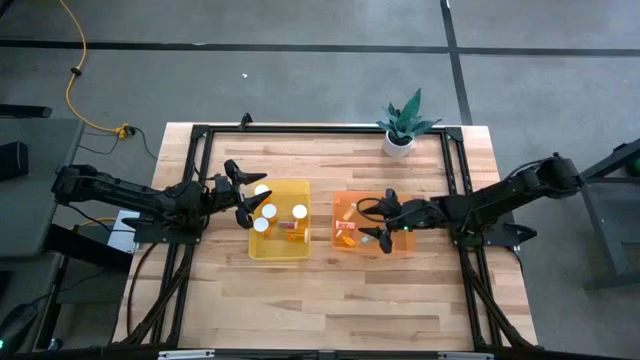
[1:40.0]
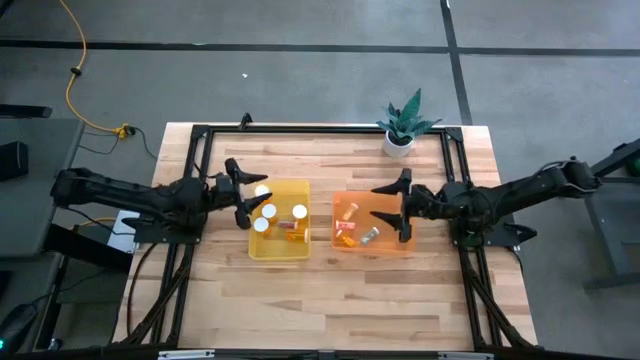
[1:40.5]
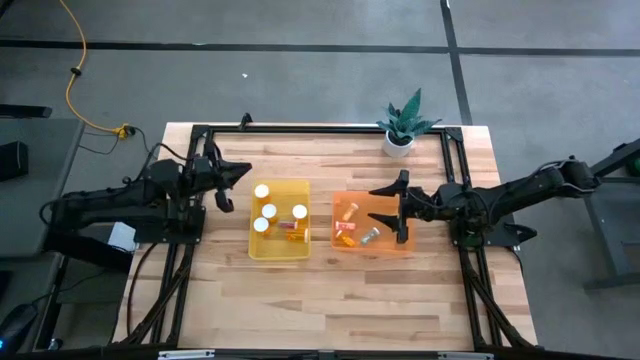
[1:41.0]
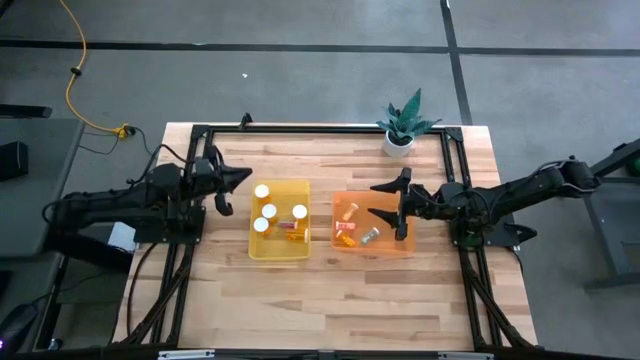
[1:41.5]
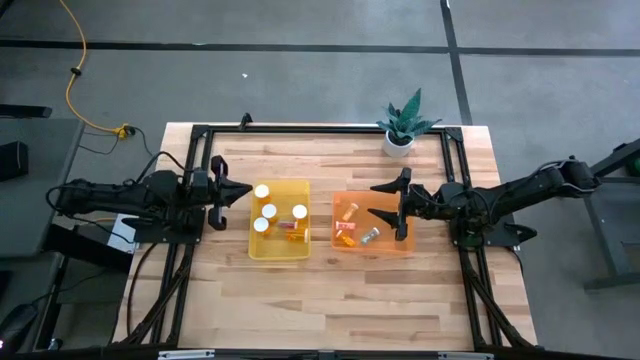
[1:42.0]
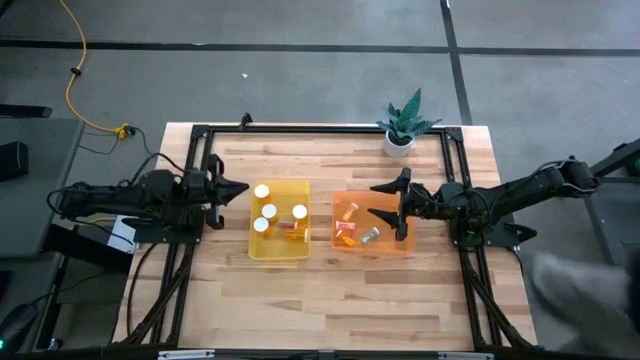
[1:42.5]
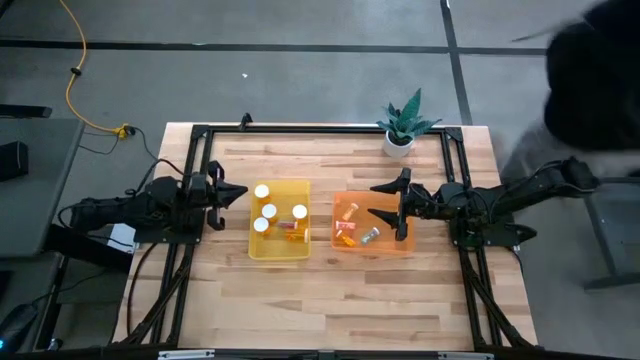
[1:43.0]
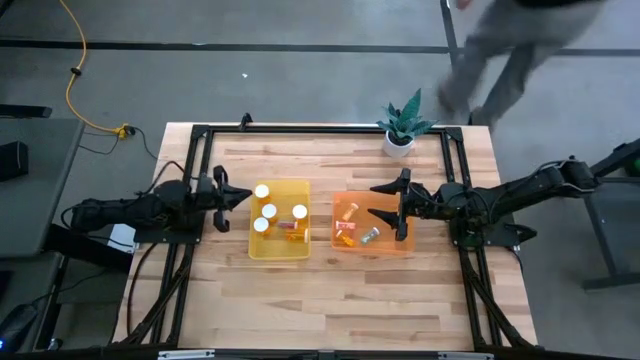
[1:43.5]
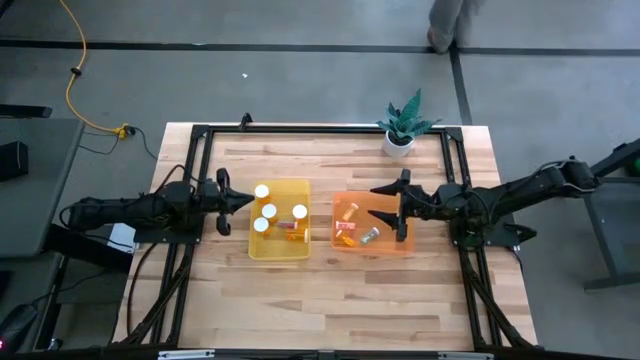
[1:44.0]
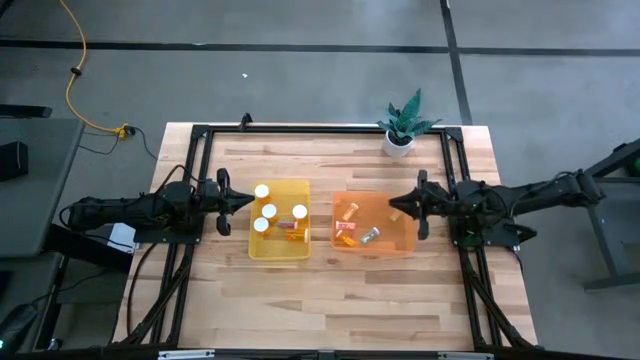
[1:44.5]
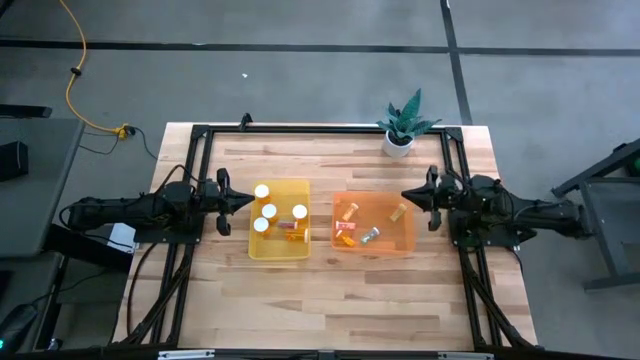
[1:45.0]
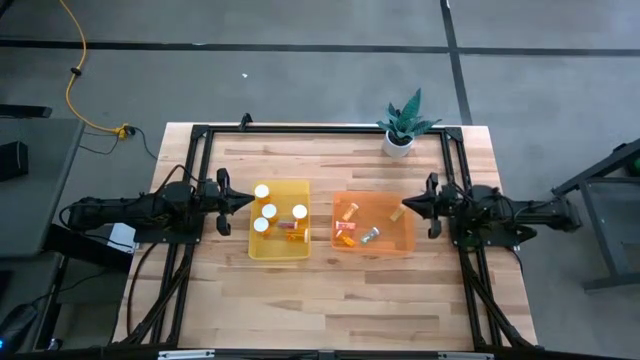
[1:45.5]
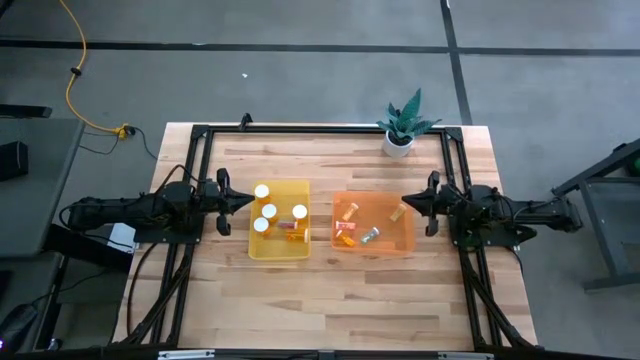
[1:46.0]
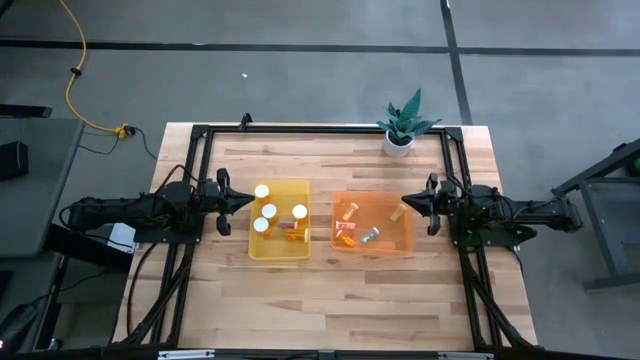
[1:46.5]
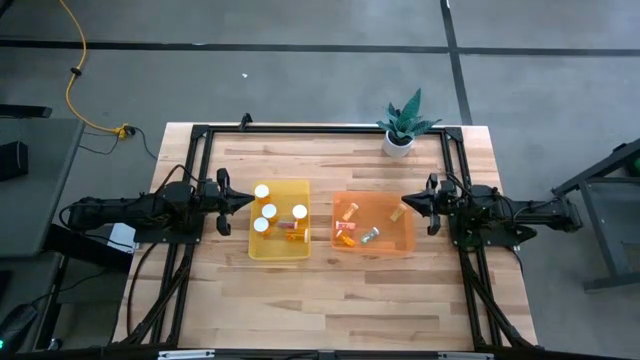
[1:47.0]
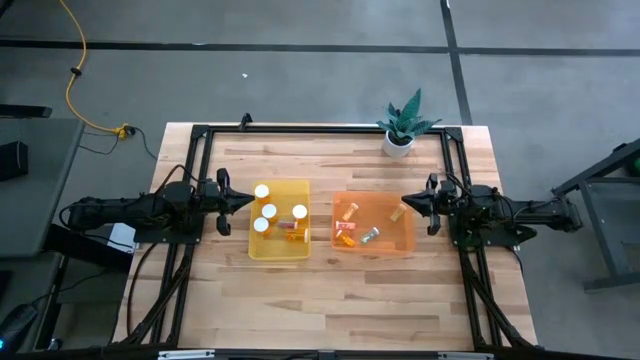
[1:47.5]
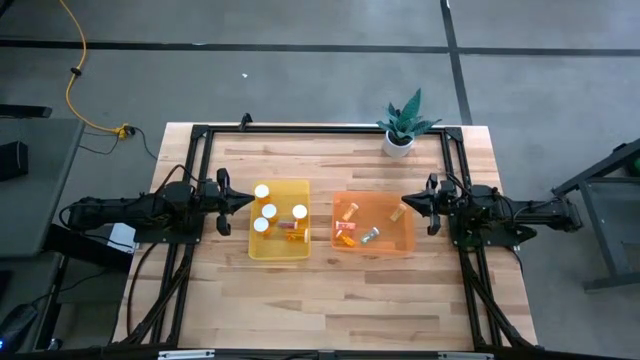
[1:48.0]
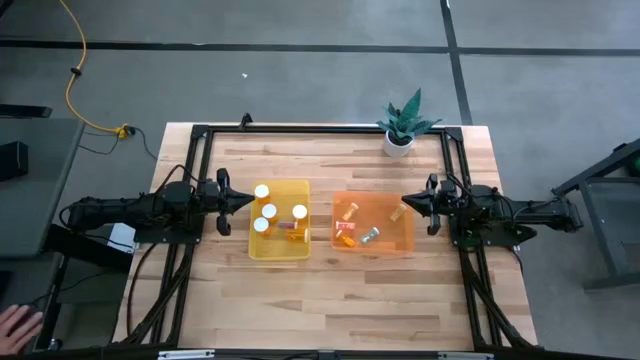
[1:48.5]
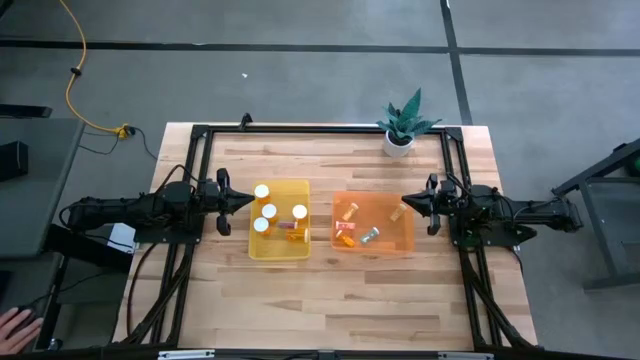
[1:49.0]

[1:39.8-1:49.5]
Task: Pick and place medicine bottles into bin by pill shape (circle, oval)
Return to Home Position

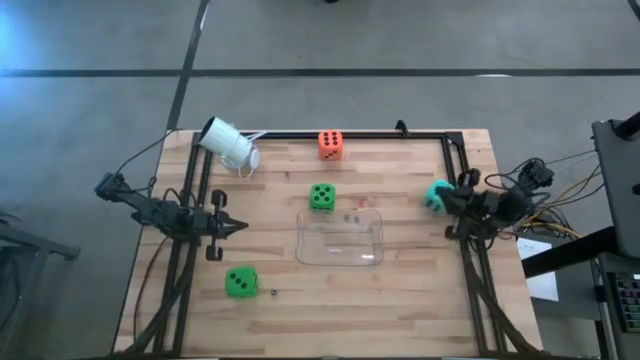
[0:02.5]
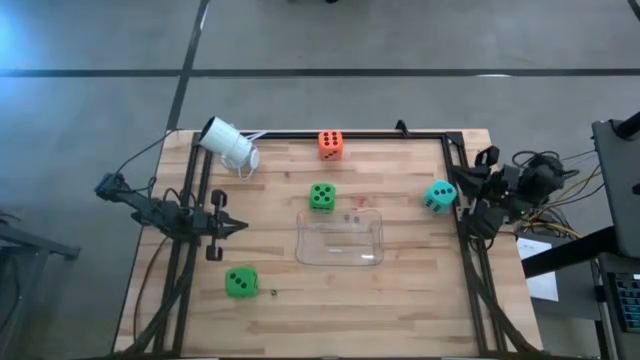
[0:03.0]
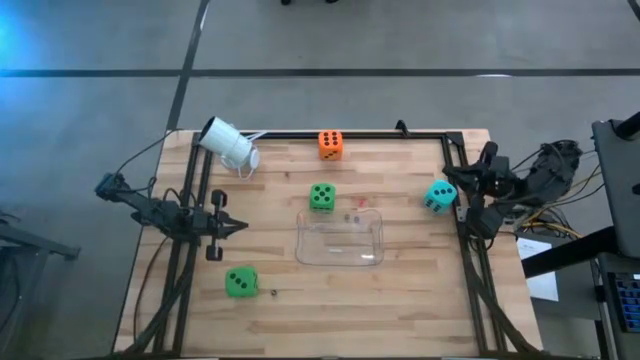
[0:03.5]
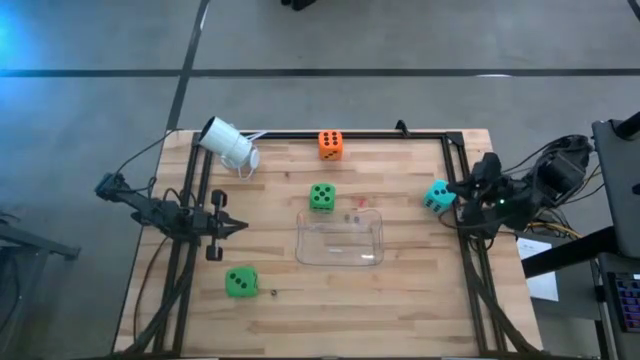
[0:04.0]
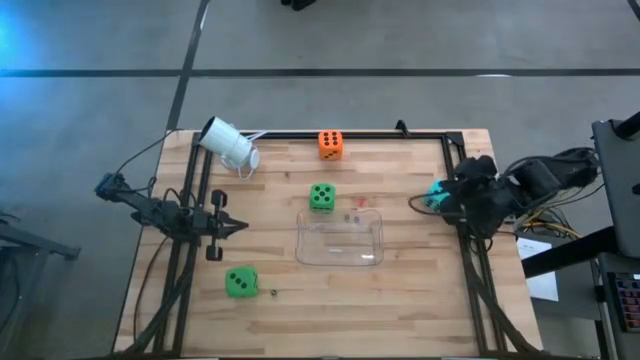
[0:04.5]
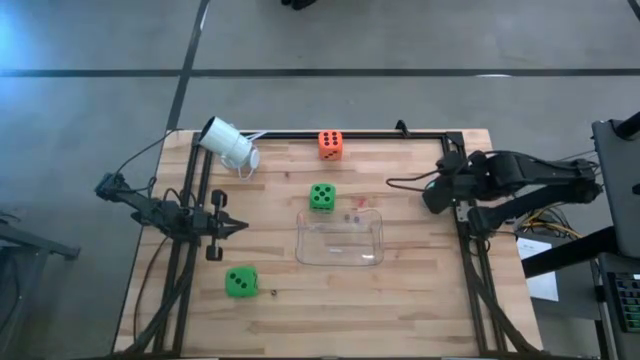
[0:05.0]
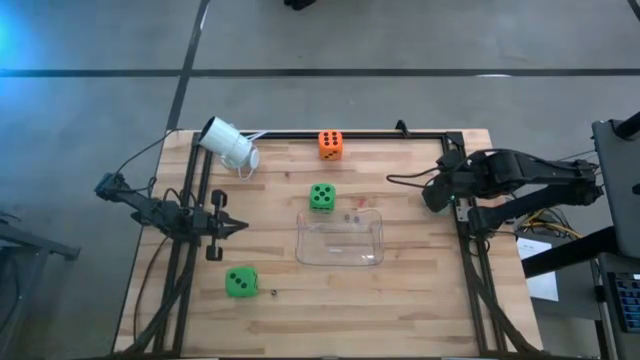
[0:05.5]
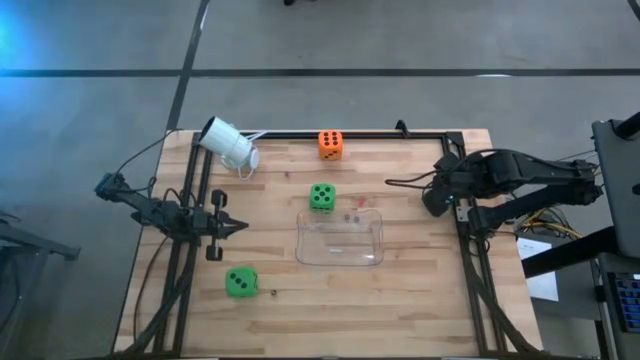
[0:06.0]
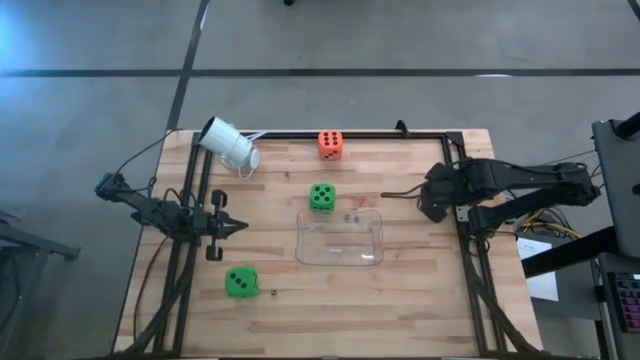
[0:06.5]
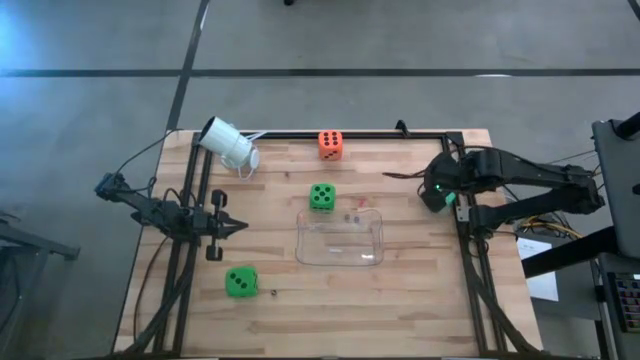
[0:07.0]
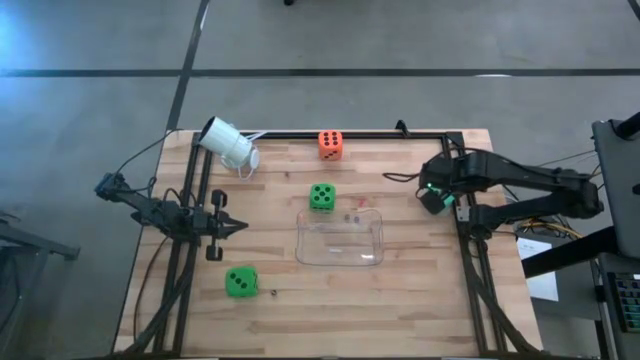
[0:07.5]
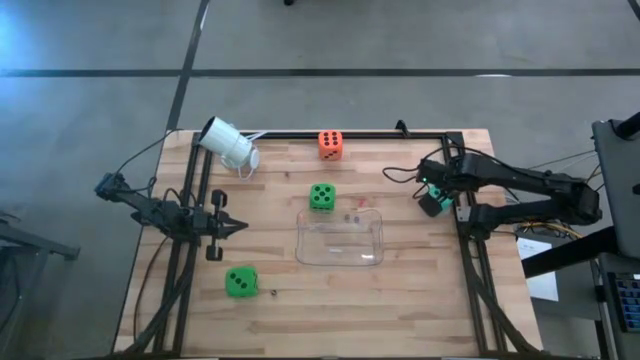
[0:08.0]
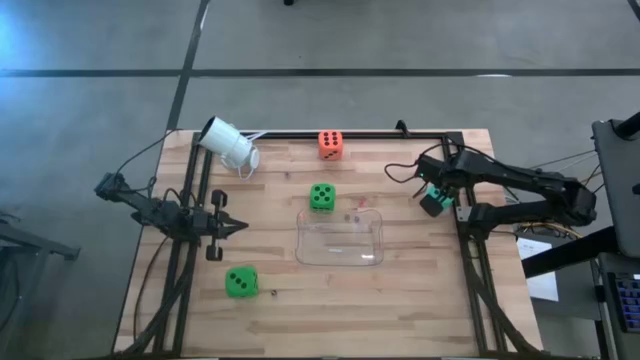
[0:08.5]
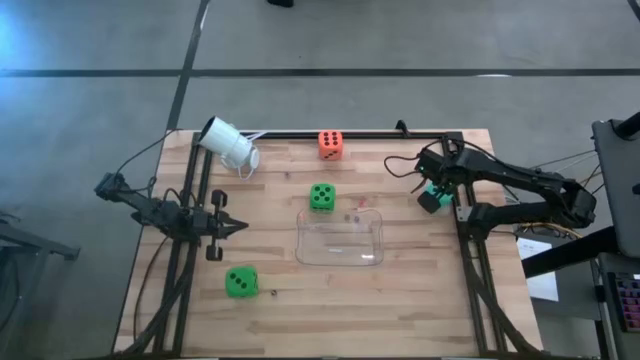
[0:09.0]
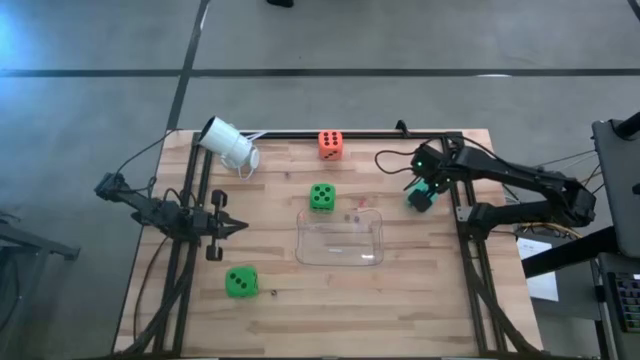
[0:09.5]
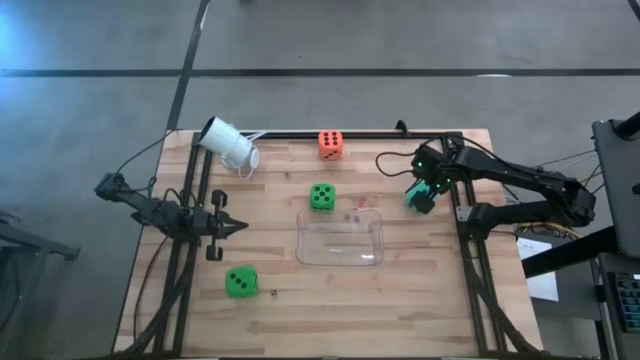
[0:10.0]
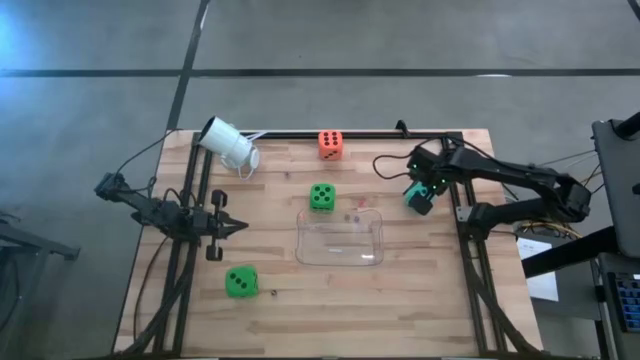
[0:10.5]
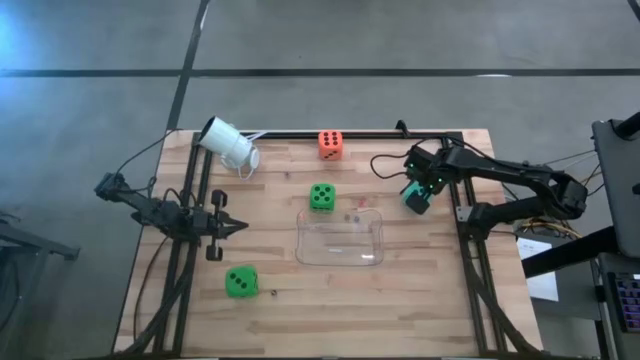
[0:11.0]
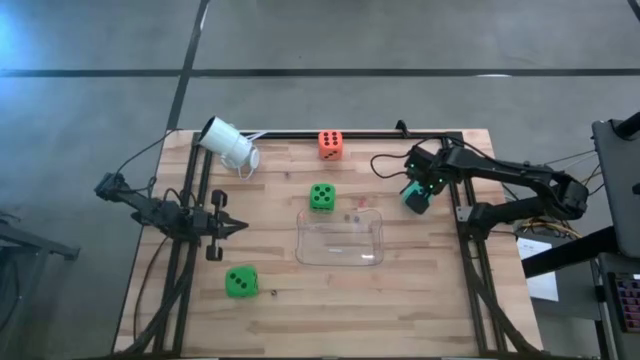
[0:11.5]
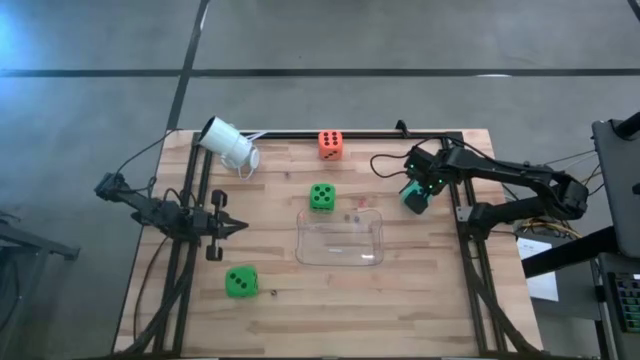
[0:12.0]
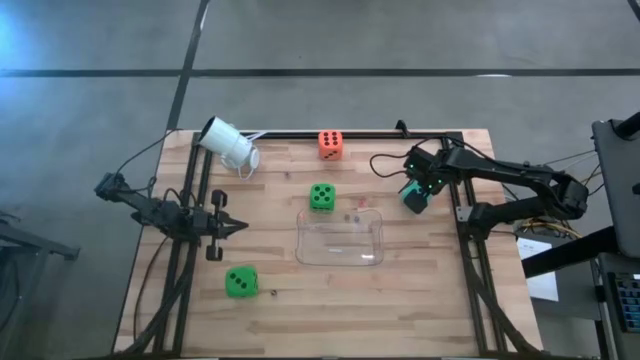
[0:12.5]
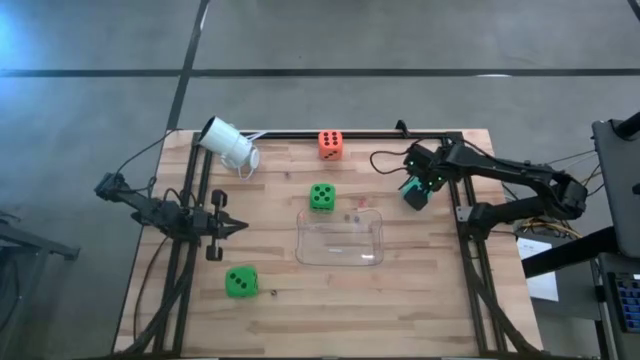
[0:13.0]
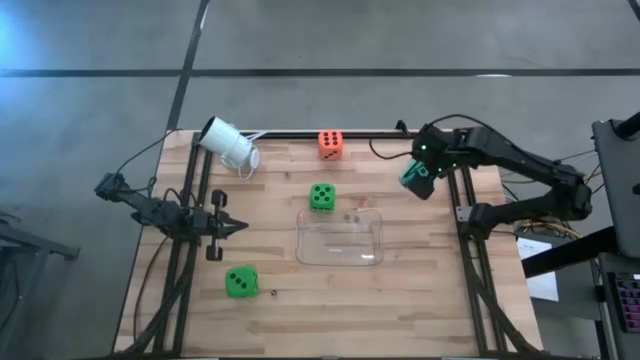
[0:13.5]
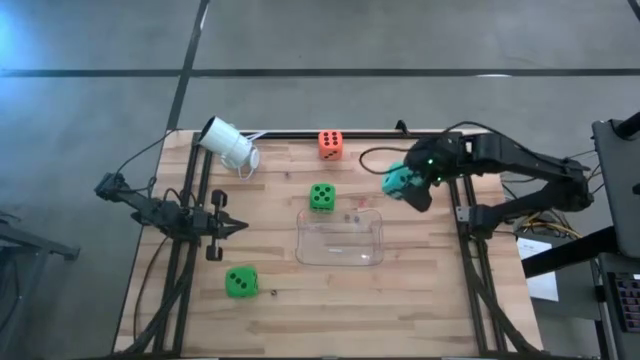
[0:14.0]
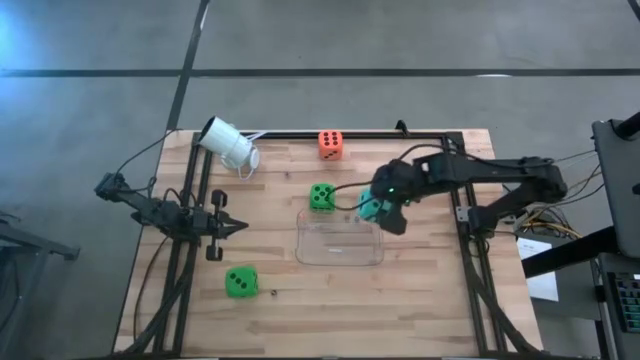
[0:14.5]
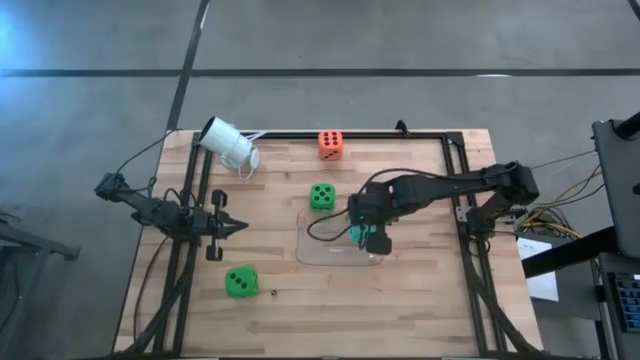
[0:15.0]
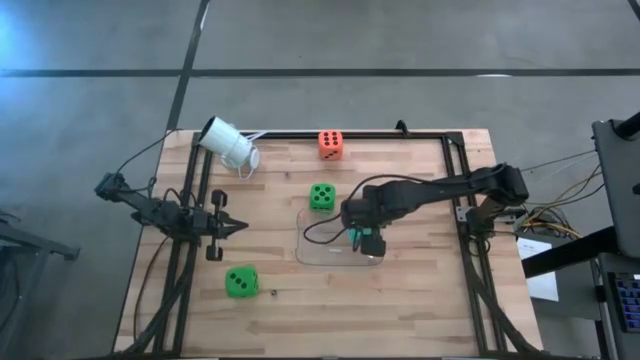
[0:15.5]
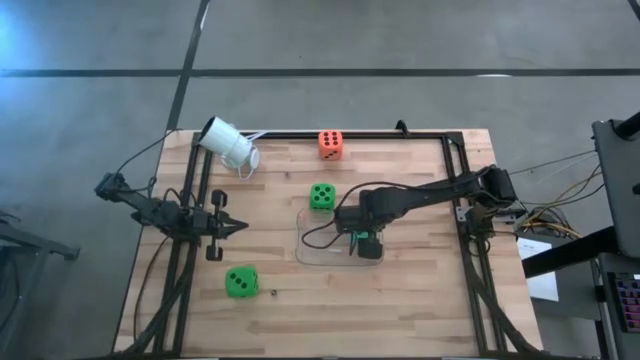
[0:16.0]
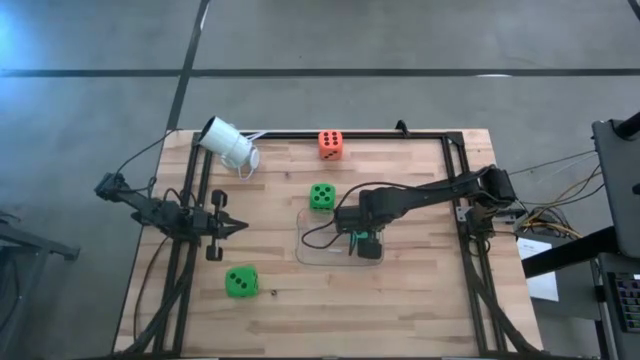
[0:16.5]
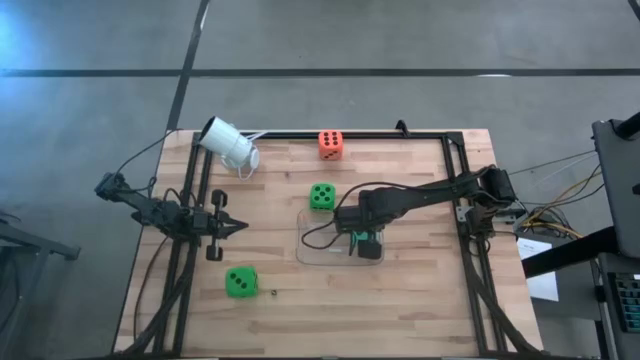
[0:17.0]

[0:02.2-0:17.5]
Task: Pick & Place Dice
Put the large light blue die into the transparent bin
